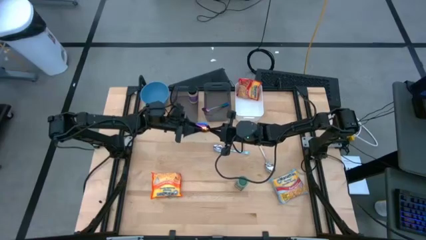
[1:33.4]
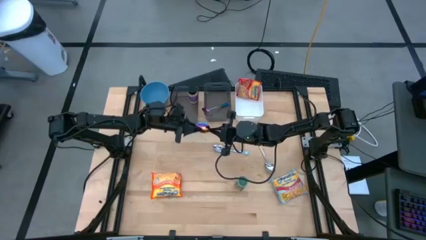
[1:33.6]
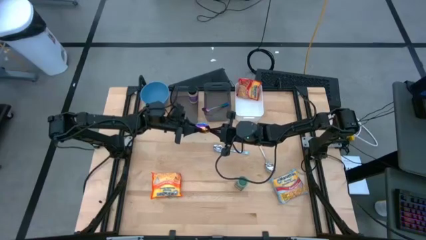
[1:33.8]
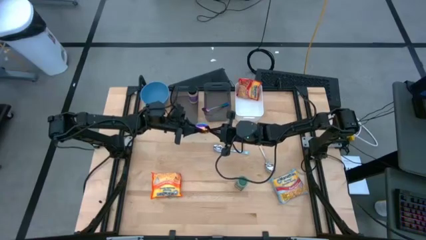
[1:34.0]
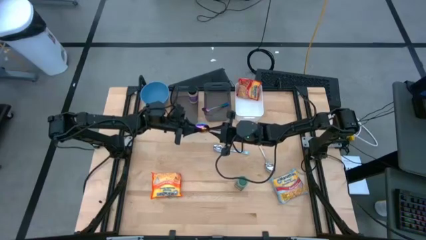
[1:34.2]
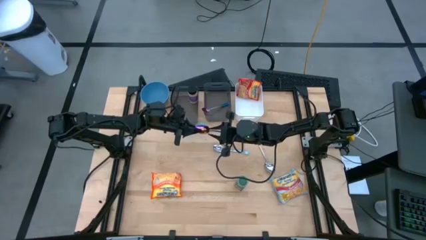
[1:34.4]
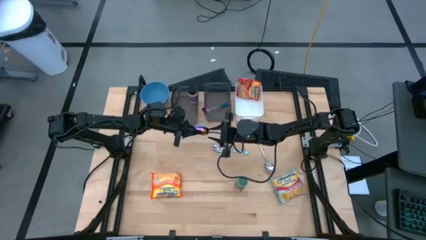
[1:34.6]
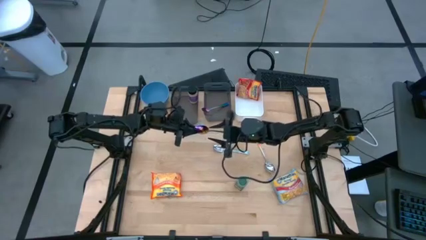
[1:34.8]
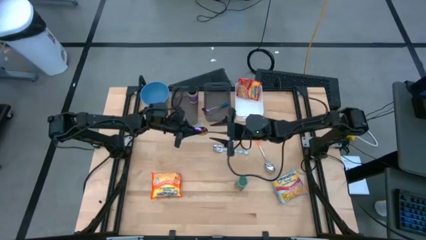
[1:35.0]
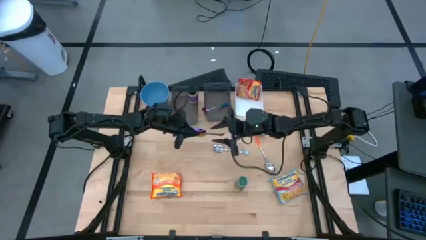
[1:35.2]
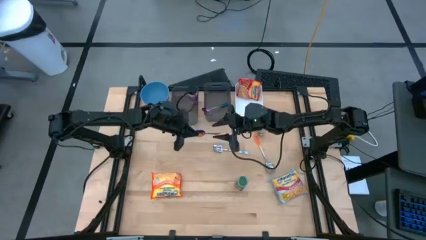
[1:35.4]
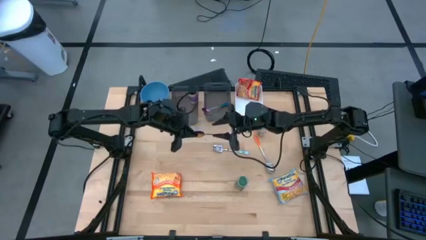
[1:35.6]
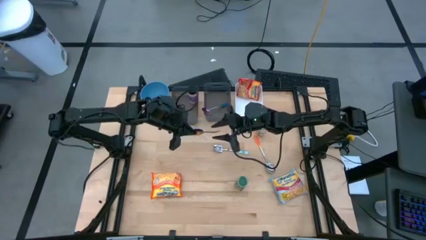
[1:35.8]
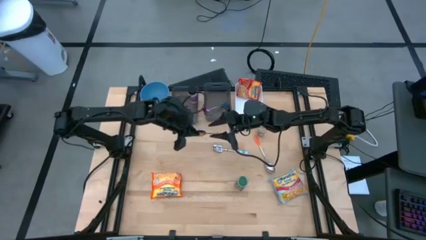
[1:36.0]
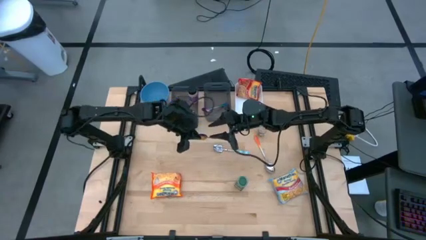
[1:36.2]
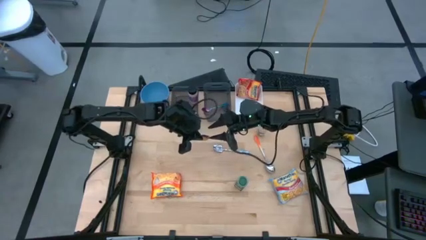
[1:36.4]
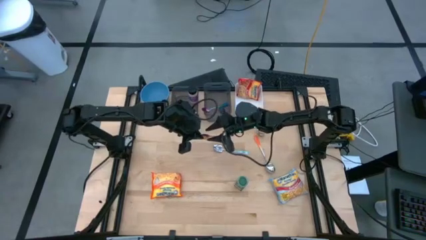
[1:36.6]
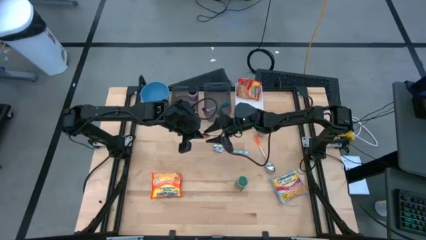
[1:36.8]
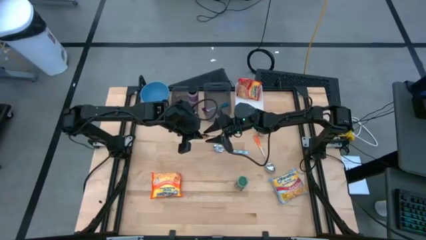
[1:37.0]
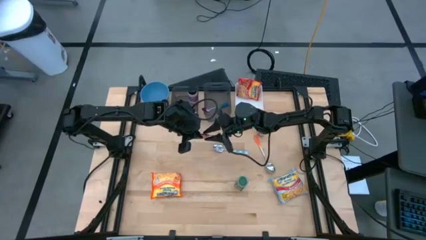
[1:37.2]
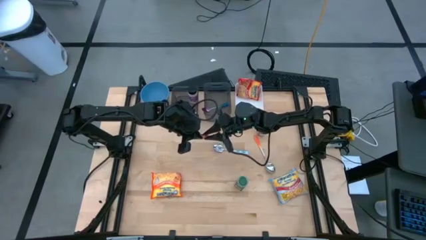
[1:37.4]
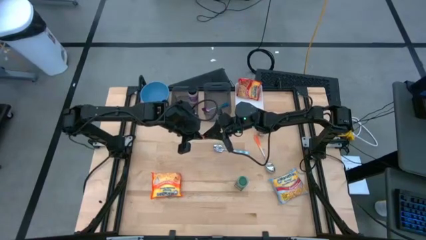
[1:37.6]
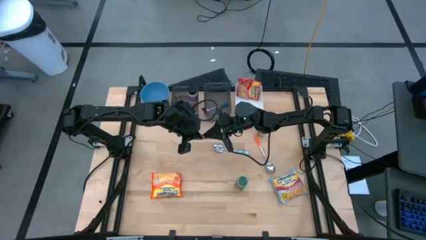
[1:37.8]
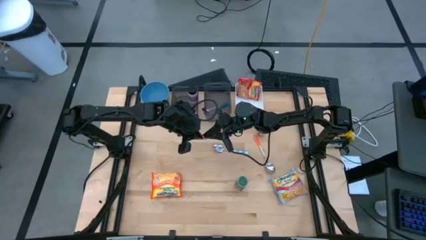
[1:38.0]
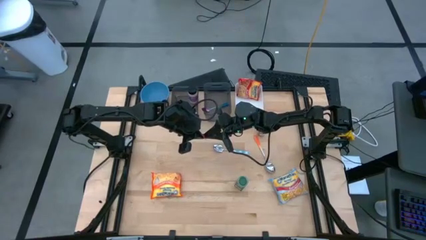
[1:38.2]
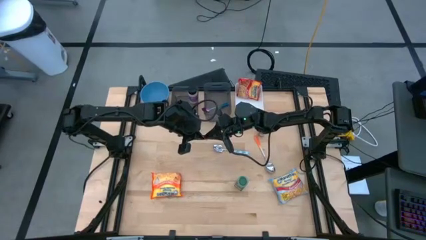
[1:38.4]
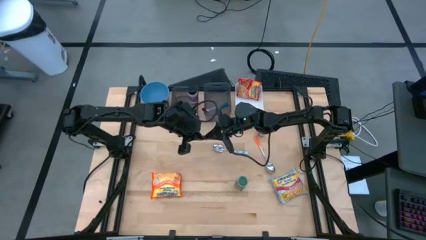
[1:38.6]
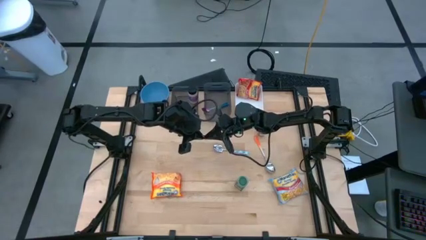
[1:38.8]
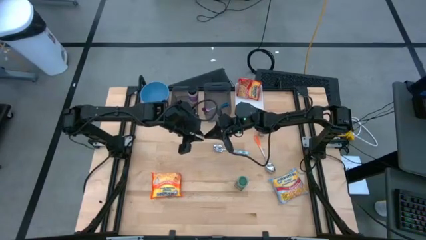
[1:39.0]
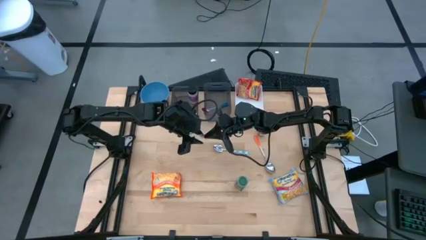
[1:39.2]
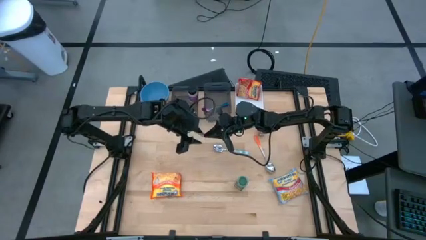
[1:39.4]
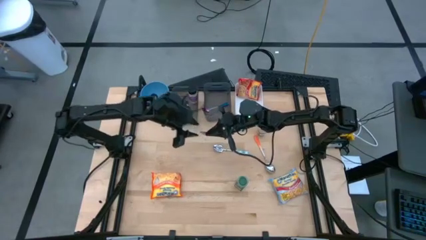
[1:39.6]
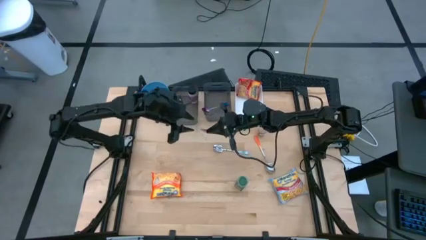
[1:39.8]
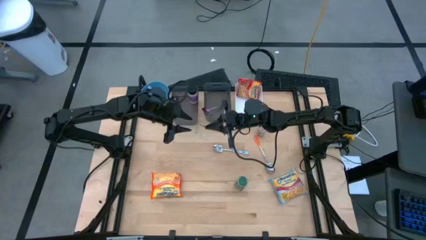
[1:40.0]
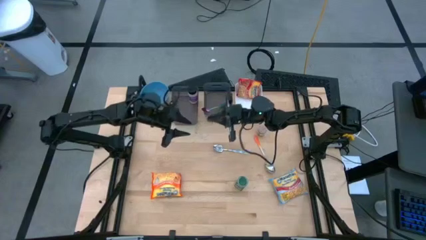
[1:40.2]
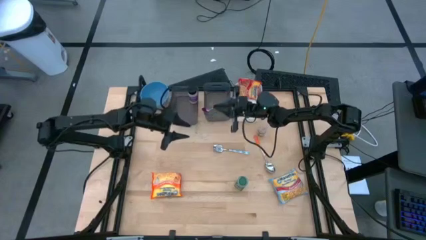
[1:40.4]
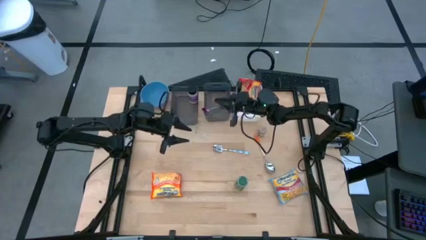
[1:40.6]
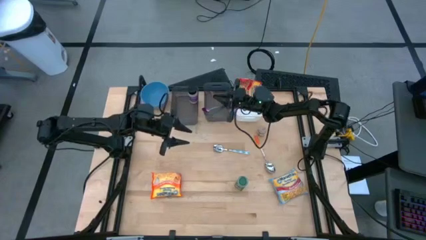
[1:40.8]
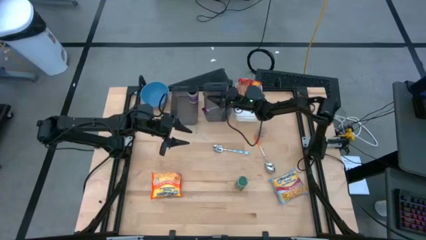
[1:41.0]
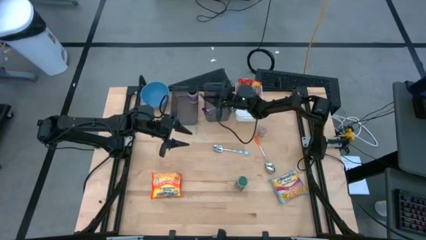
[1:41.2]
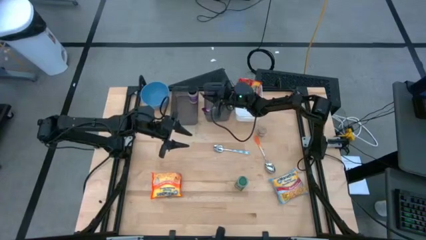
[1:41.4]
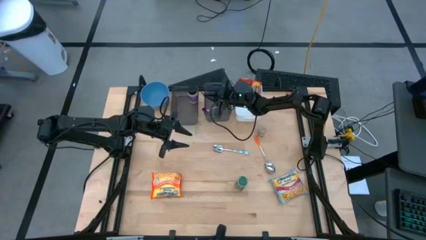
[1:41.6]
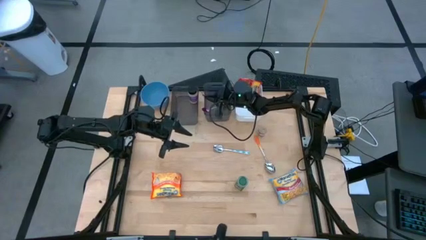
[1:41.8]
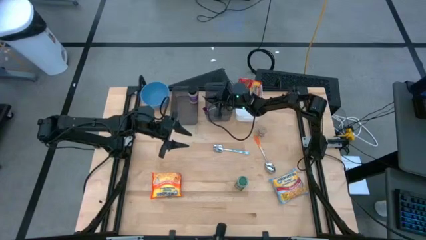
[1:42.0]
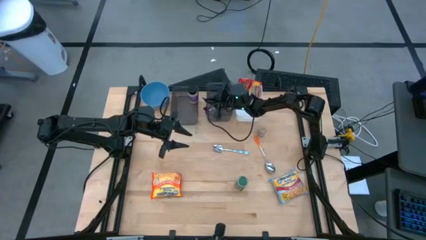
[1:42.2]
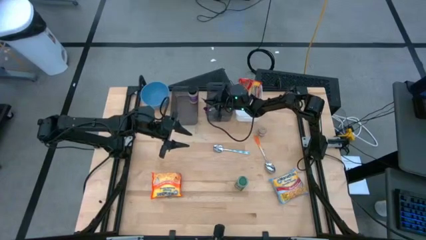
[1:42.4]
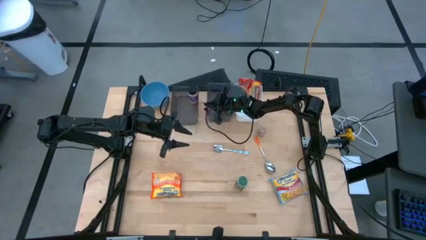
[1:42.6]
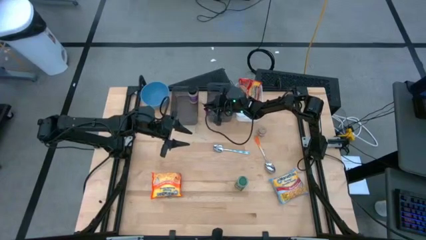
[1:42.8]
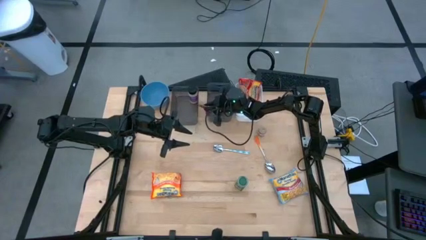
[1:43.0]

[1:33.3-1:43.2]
Task: Pick & Place Food Item
Put the blue spoon into the right black bin

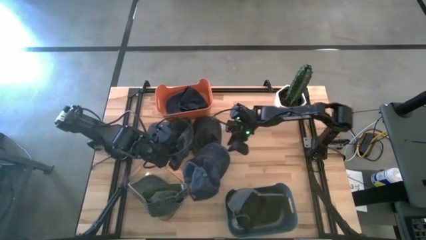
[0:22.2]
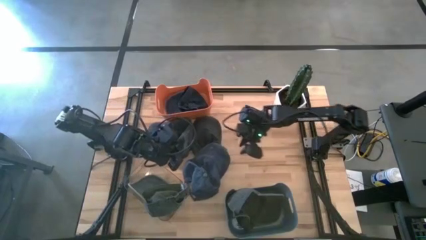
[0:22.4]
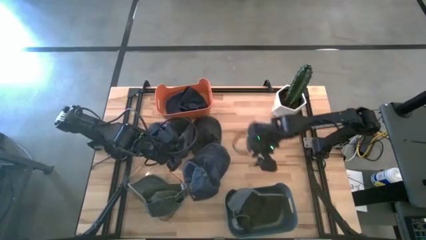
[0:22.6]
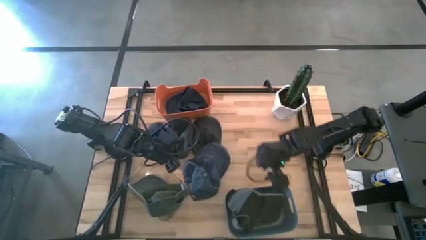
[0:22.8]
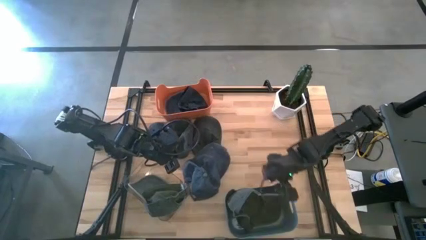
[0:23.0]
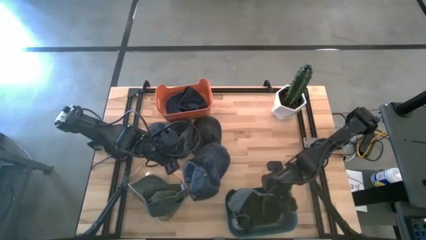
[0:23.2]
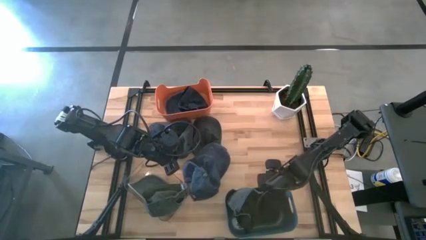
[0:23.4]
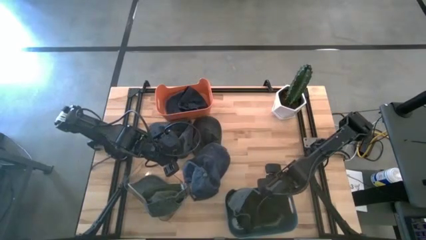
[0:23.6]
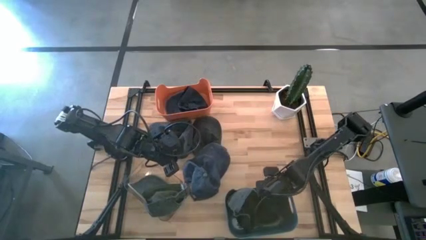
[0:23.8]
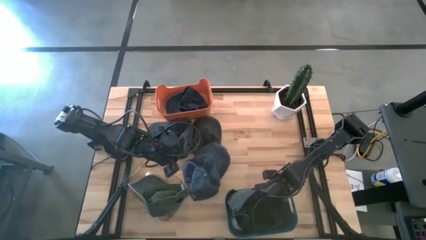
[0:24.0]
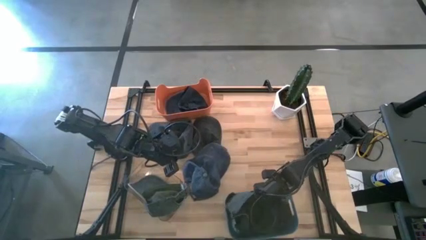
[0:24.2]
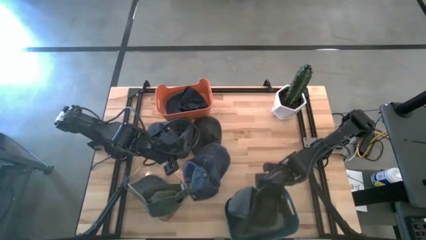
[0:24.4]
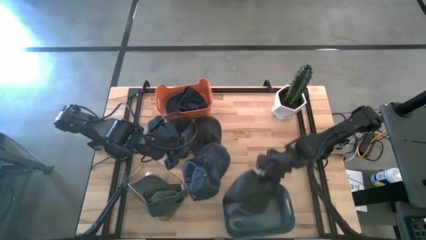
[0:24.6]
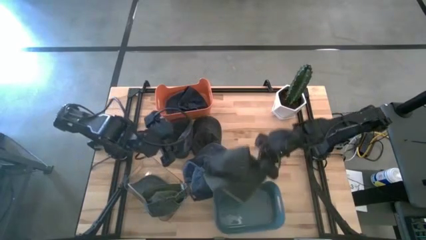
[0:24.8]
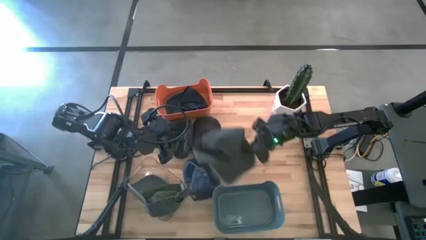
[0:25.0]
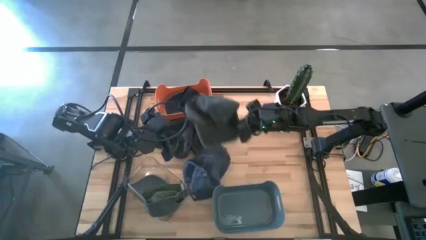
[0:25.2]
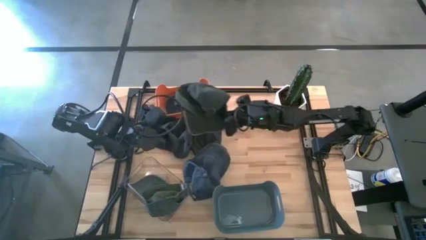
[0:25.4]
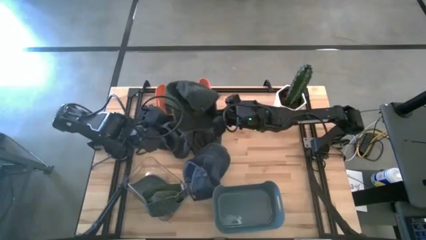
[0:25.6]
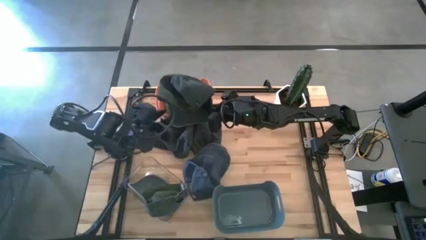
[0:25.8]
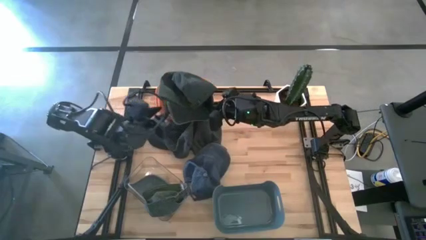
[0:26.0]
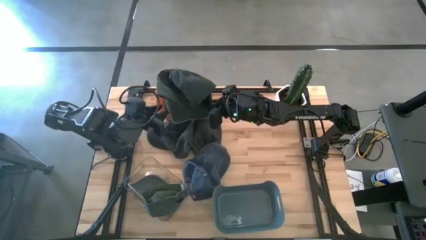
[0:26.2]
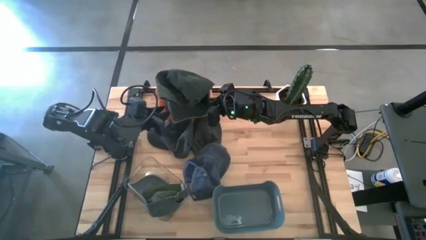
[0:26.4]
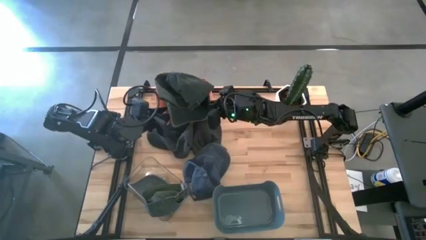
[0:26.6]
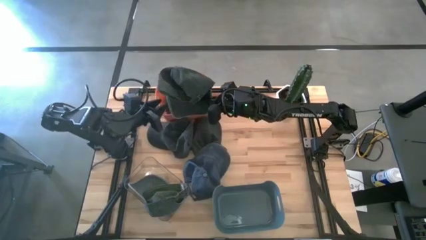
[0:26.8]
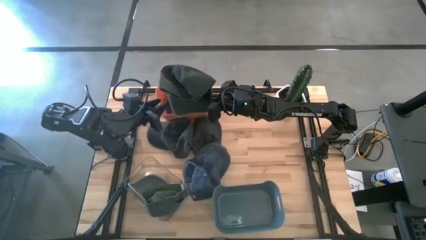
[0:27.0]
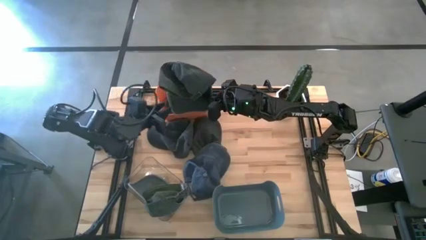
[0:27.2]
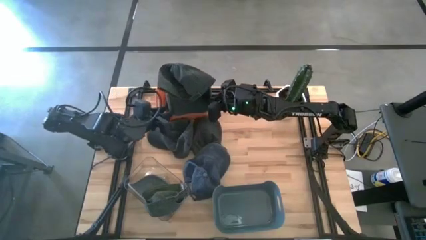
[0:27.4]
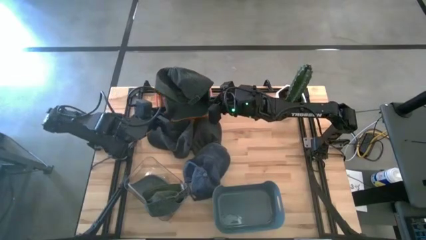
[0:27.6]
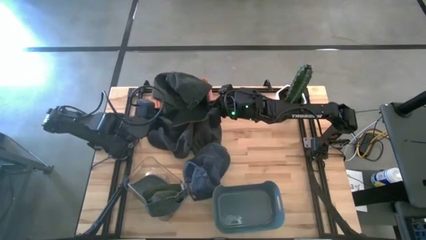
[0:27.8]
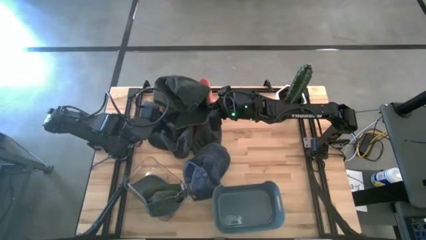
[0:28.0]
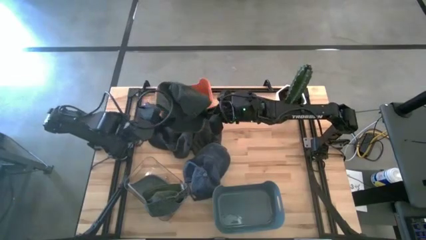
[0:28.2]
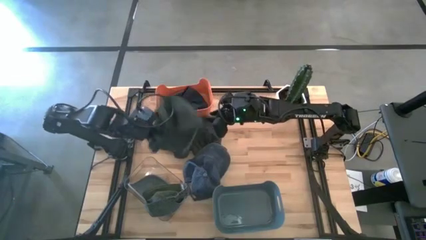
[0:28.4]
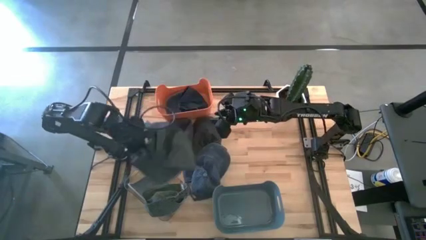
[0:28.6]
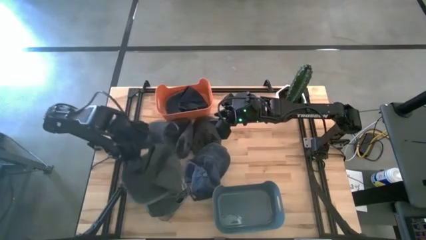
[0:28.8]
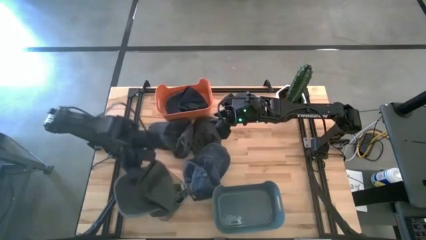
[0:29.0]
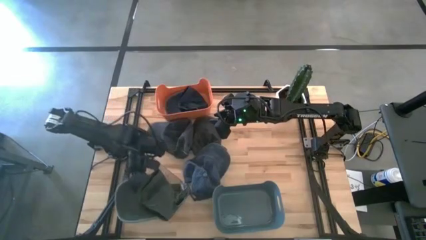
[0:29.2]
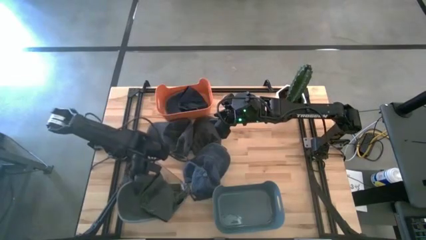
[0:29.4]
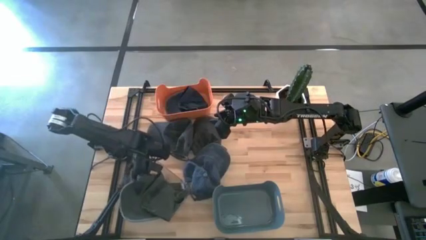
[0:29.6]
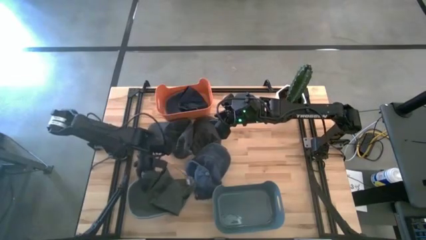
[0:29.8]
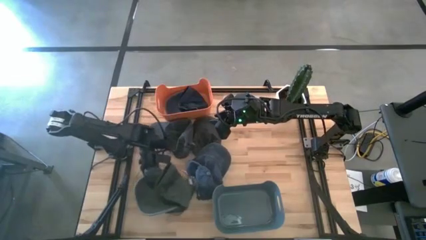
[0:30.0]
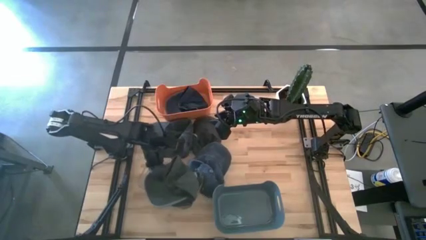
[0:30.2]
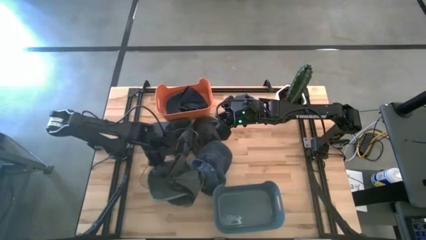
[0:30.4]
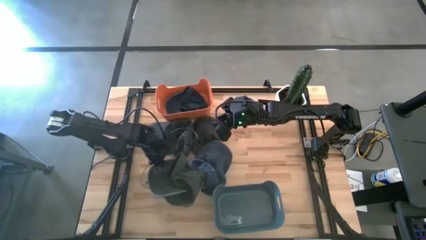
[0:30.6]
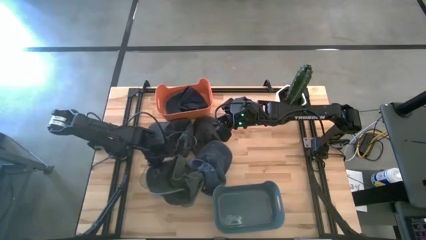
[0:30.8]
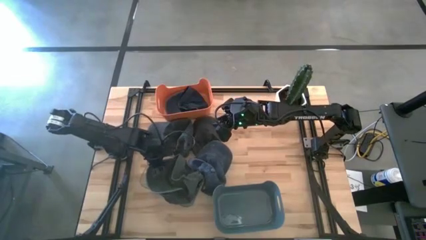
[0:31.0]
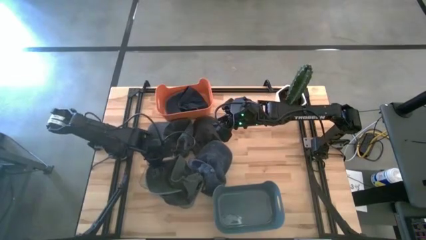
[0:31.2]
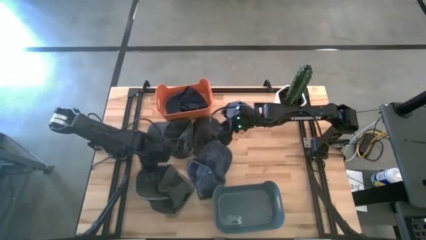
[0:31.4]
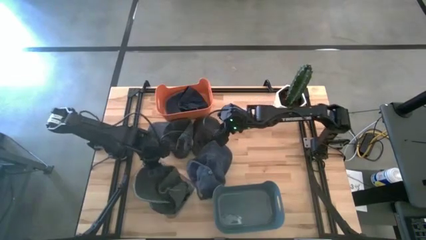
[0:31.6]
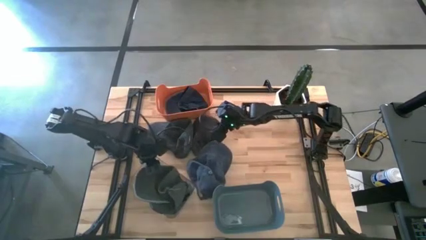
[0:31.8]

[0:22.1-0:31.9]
Task: Pick & Place hat
Put the green cap into the transparent bin
